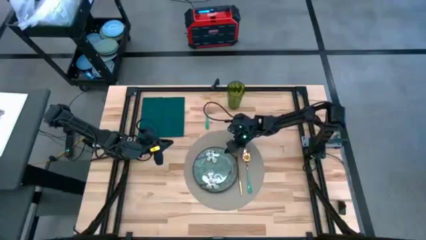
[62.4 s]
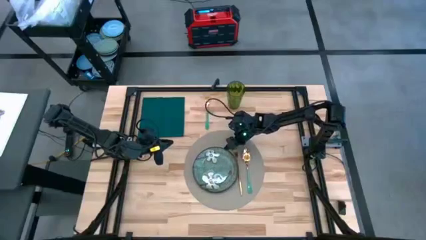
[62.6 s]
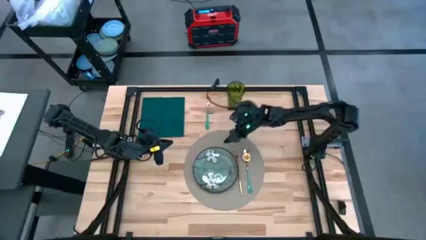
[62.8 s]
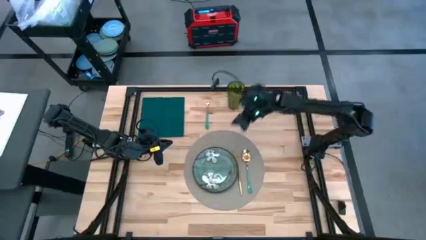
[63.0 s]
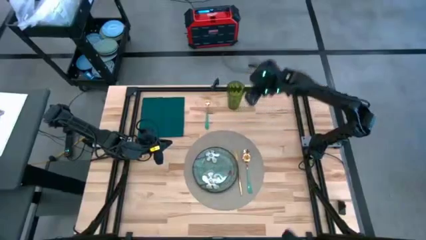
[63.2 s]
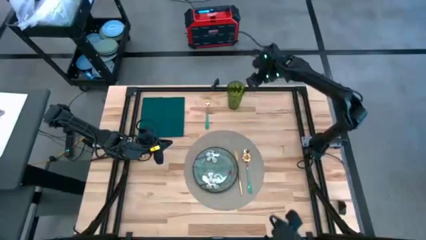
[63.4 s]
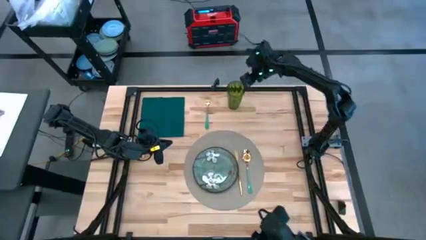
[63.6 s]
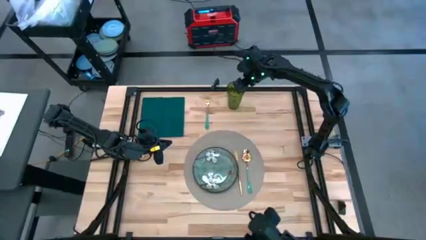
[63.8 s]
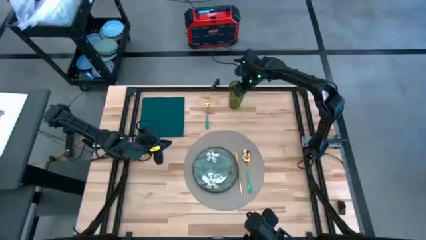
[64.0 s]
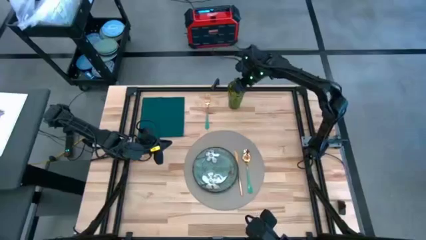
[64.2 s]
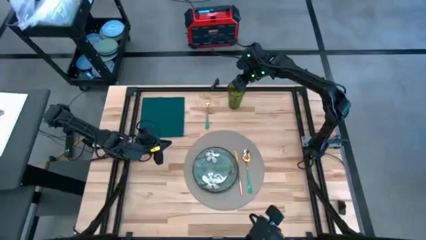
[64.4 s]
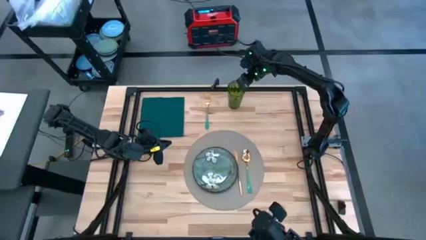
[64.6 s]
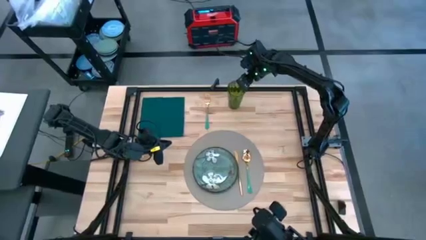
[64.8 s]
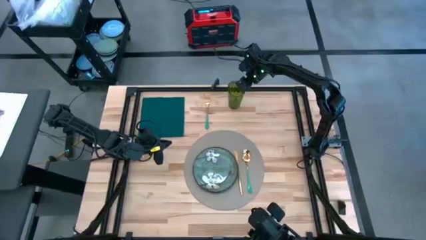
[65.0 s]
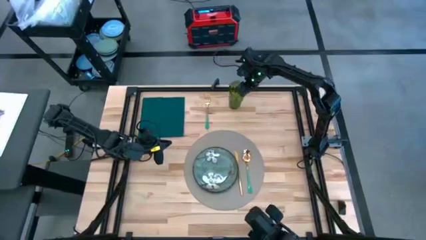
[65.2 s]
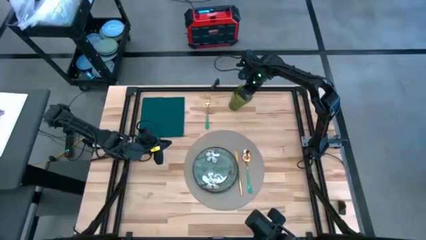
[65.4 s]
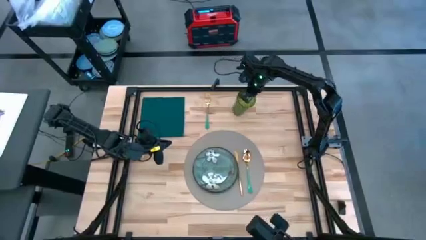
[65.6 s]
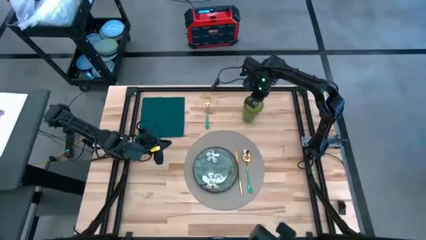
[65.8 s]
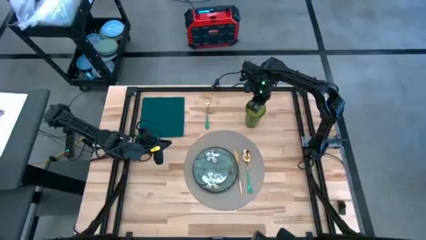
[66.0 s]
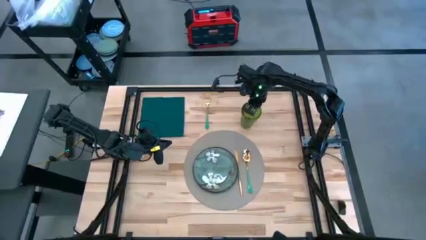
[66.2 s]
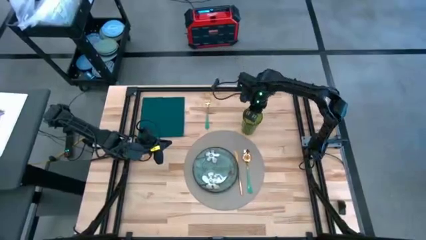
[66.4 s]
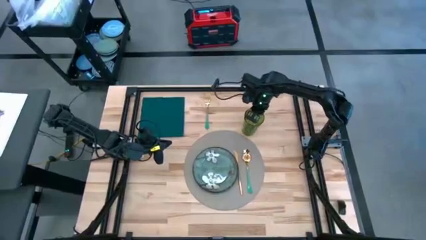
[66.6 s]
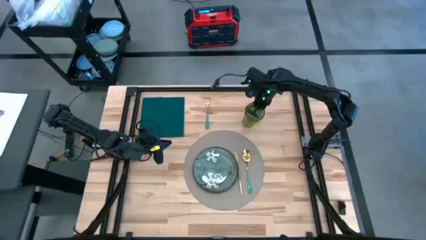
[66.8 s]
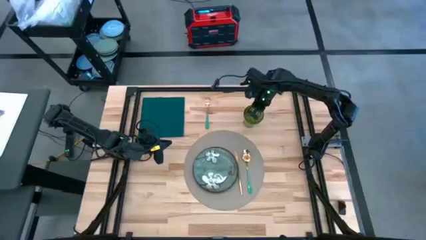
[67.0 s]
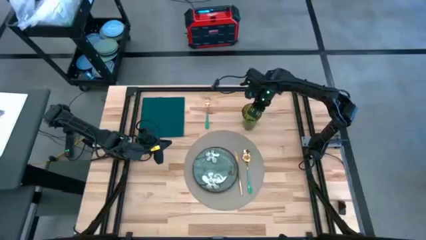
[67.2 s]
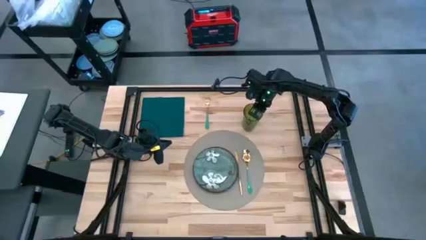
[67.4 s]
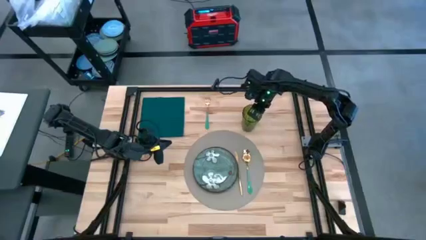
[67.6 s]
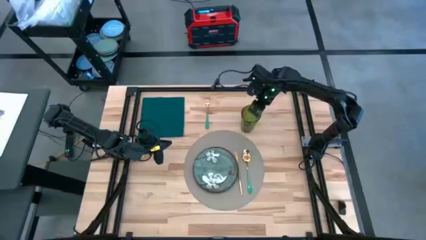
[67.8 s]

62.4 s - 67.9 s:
Task: Set table place
Move the green cup on top of the gray placemat

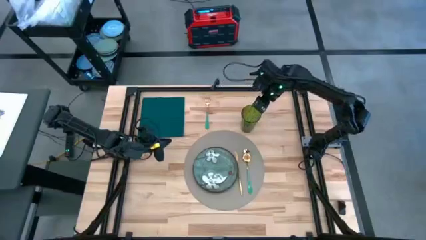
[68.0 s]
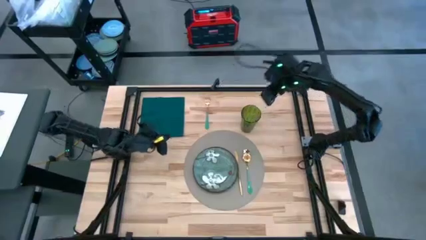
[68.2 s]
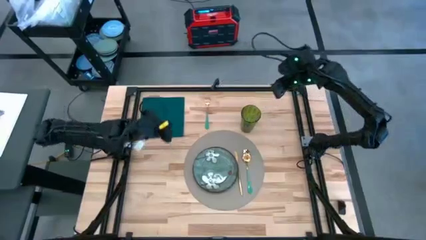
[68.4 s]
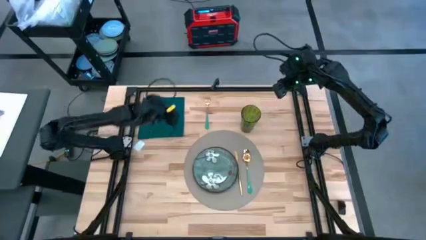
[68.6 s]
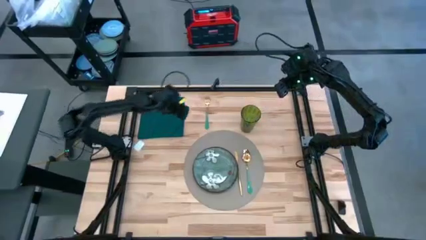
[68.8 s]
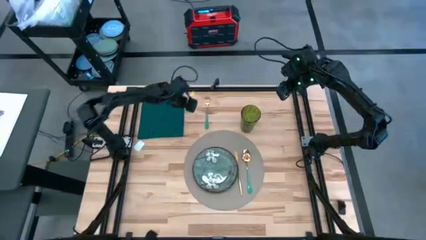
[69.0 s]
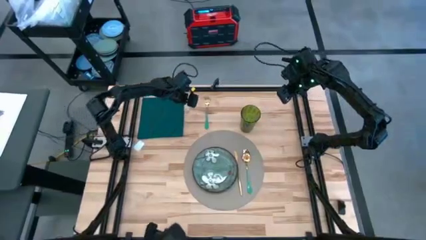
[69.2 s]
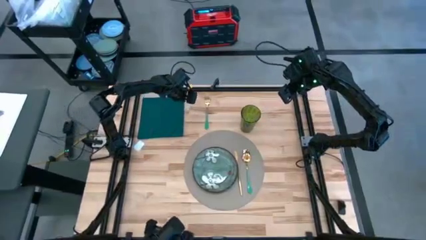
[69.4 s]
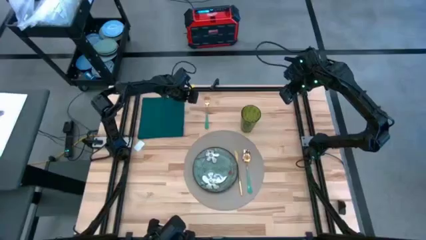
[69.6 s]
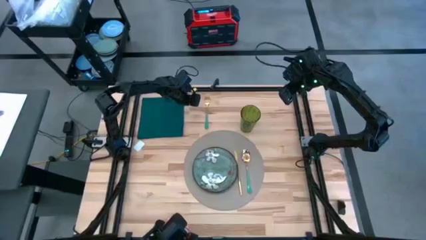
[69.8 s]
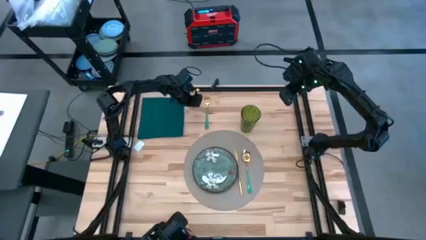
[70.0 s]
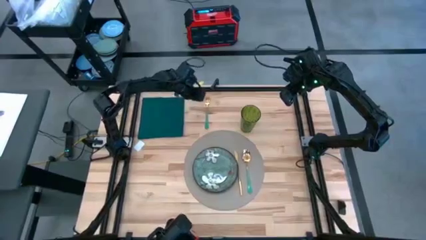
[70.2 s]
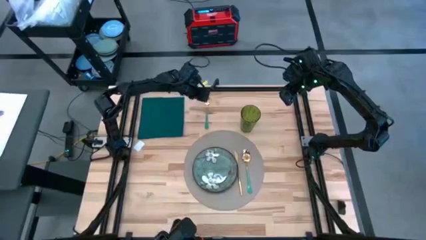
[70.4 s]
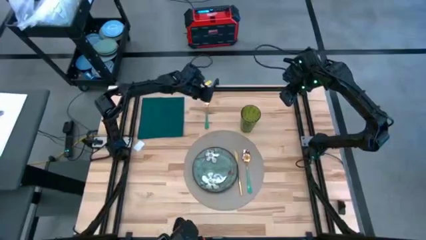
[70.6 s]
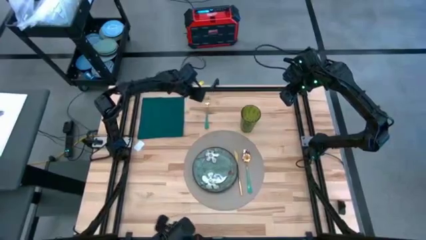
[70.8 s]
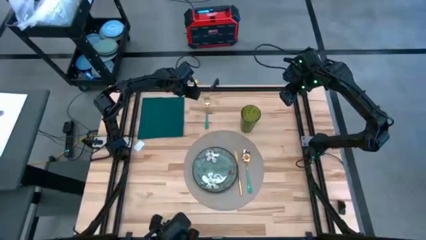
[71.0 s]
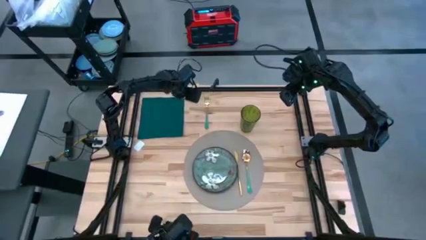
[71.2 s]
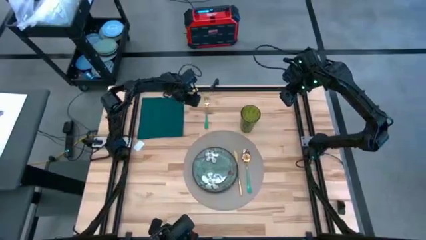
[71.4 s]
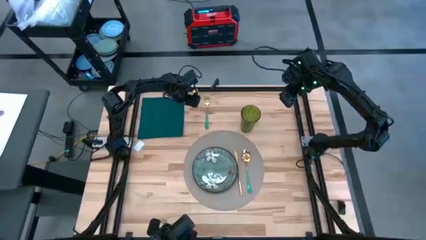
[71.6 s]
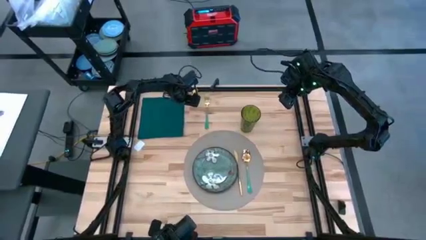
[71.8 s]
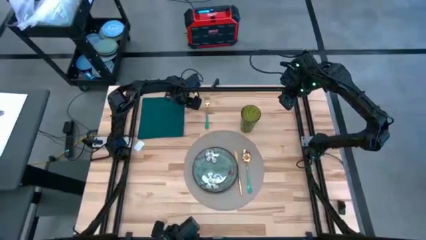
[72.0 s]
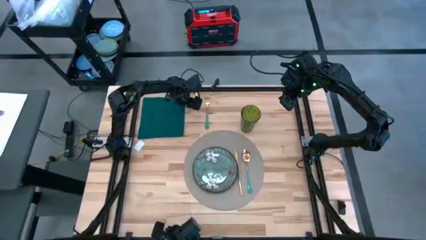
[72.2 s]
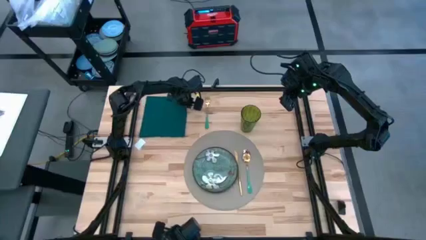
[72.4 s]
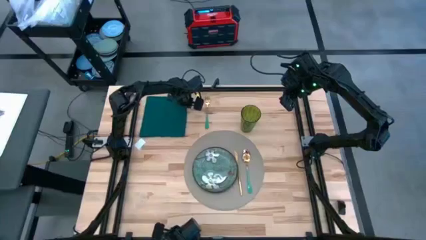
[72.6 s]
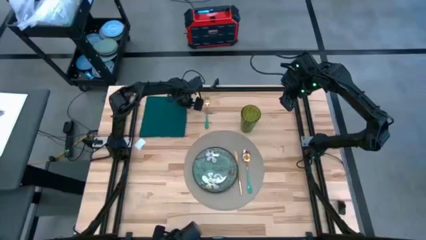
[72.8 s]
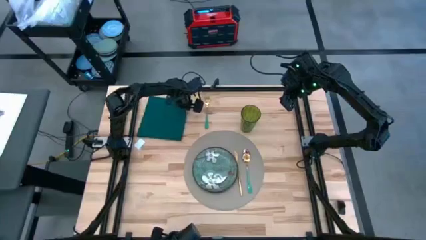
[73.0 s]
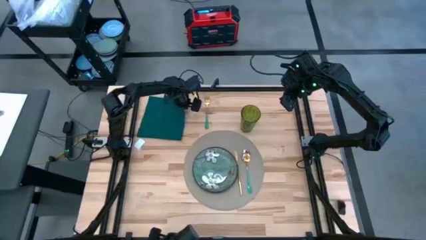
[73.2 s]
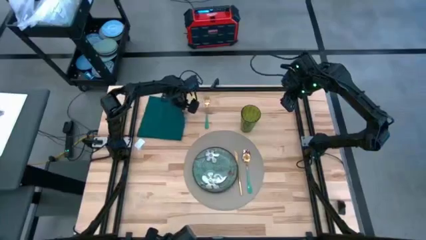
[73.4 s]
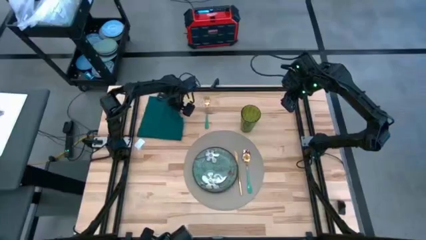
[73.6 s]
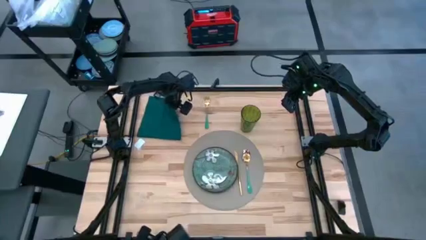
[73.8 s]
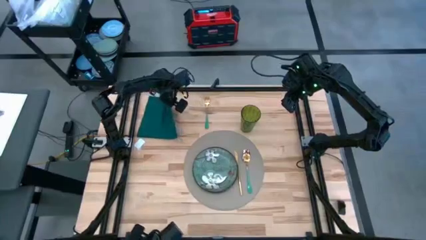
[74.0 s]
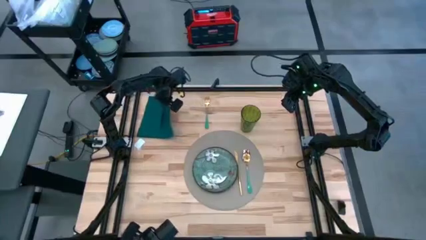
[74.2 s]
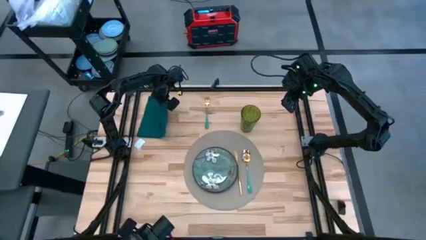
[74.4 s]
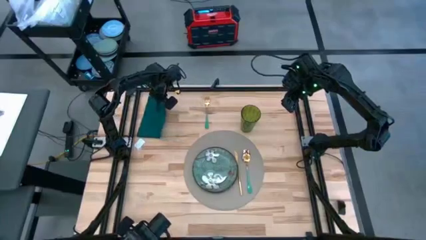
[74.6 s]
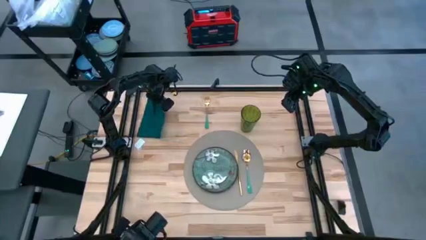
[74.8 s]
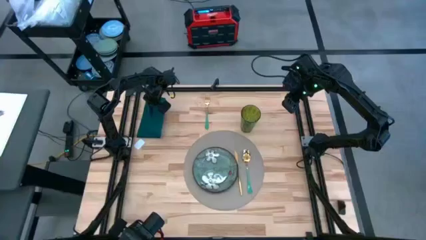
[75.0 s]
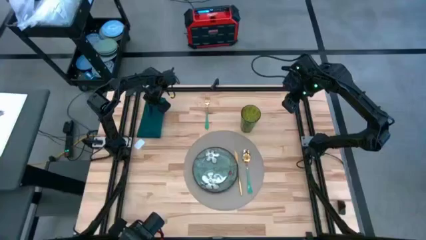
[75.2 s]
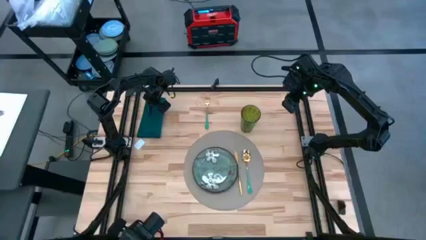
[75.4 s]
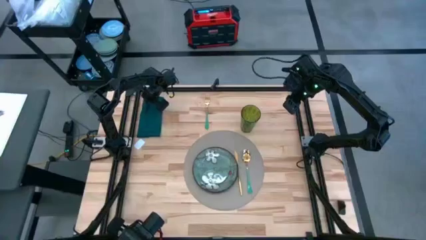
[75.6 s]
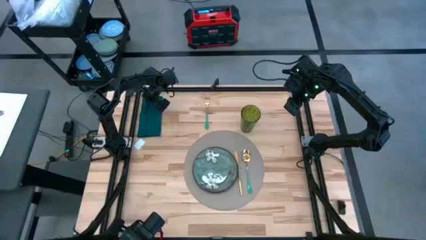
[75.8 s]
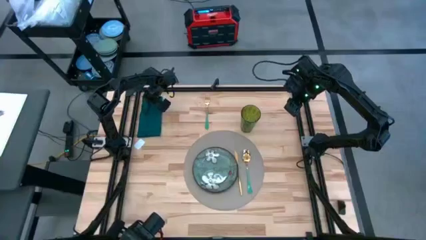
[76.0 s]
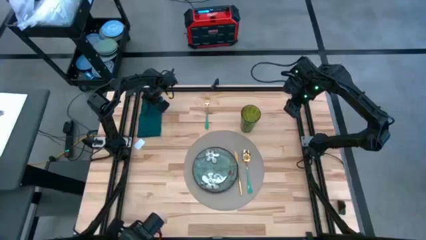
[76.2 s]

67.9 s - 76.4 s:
Fold the green napkin

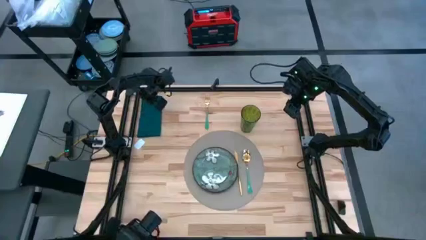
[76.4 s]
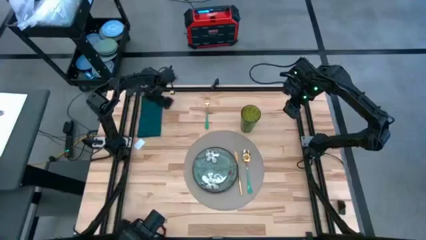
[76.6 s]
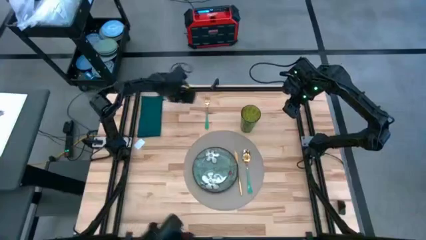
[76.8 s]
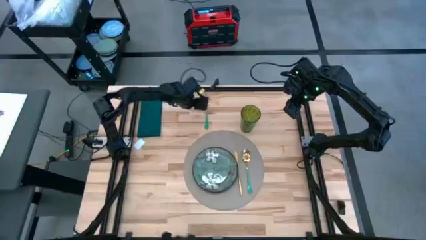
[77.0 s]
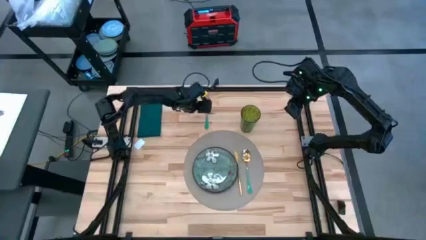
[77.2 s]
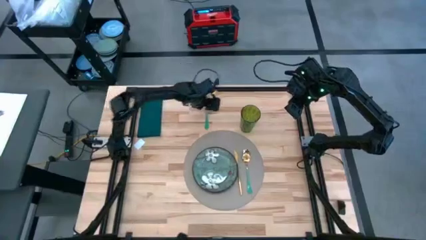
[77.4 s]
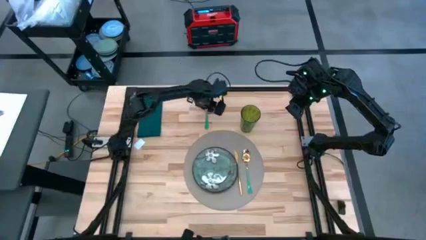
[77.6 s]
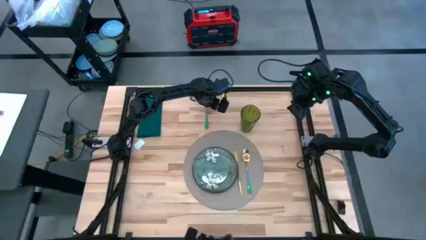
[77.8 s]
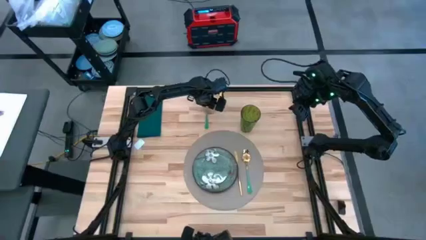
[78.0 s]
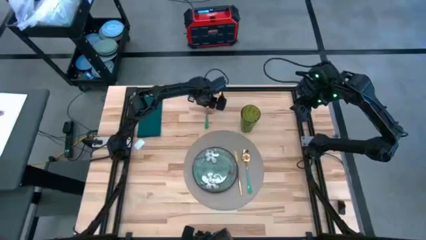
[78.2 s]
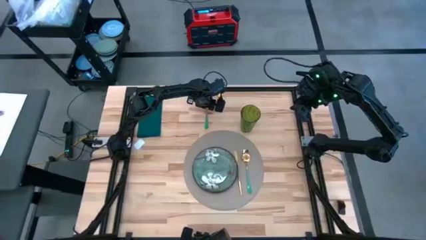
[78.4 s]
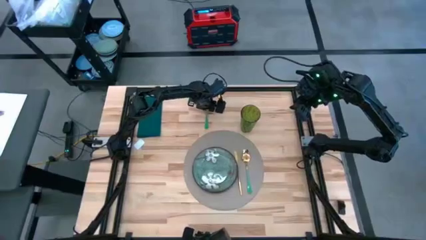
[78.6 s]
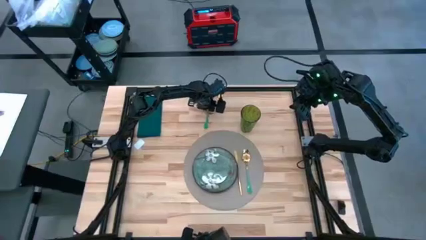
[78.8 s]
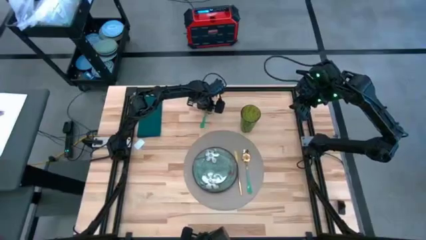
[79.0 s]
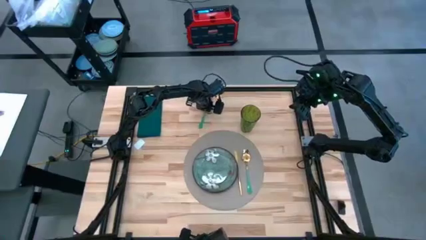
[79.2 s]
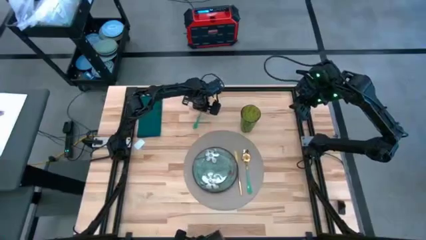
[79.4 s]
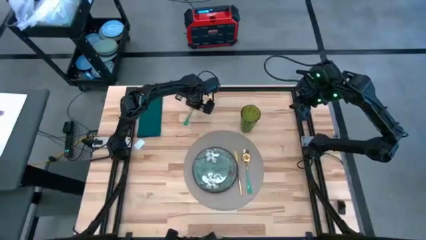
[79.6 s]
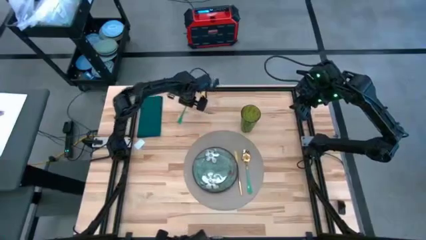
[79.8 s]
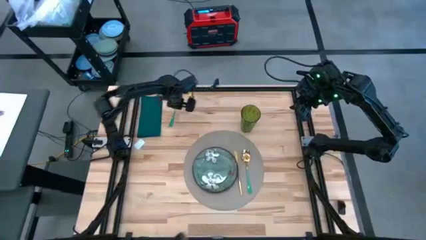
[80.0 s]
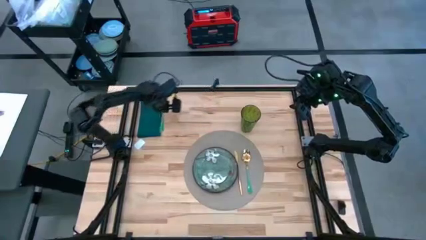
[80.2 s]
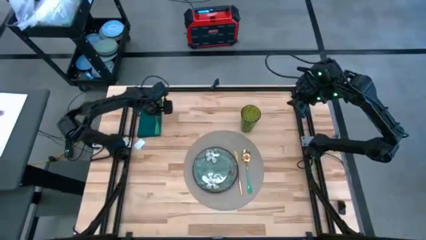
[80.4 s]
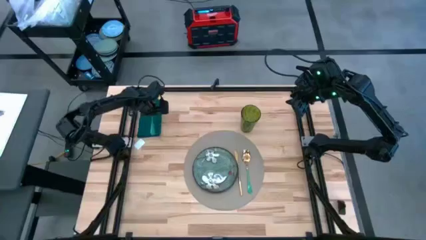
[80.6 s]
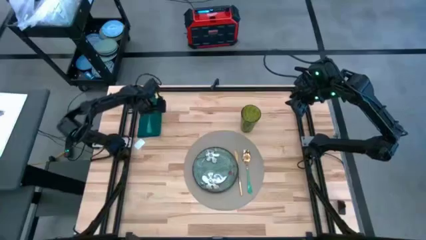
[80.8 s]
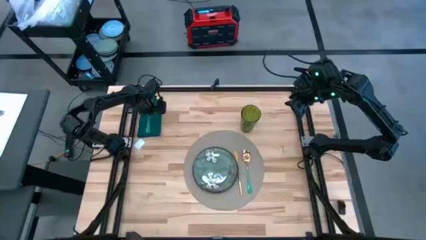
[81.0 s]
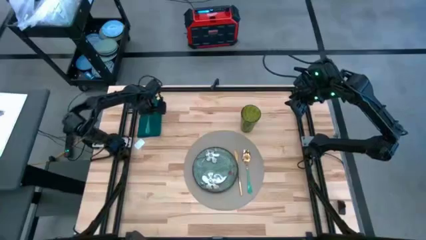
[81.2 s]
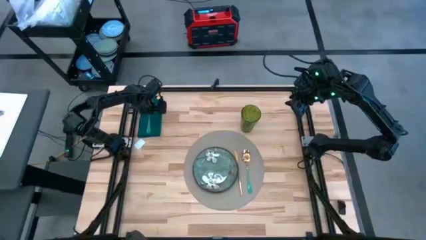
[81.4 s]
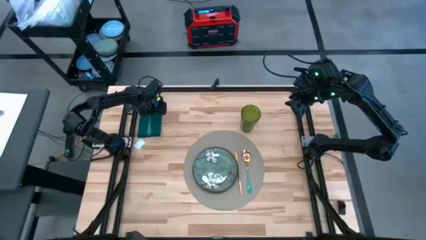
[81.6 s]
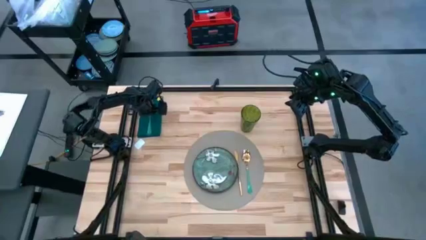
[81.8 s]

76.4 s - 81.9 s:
Put the fork on the green napkin
